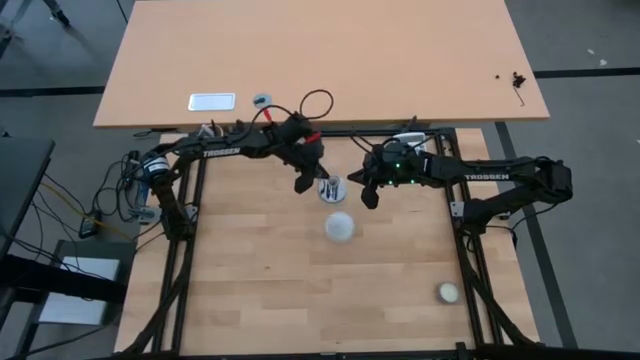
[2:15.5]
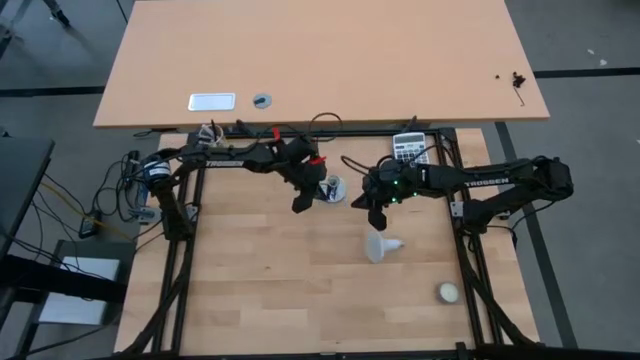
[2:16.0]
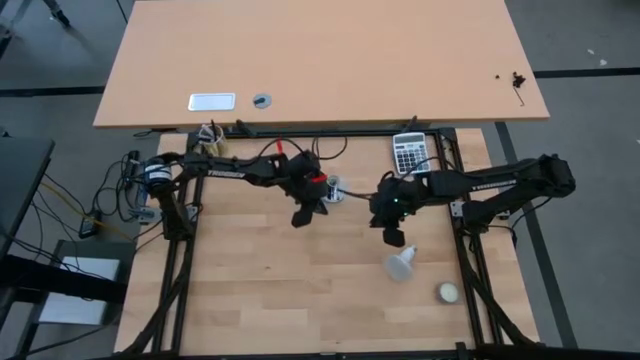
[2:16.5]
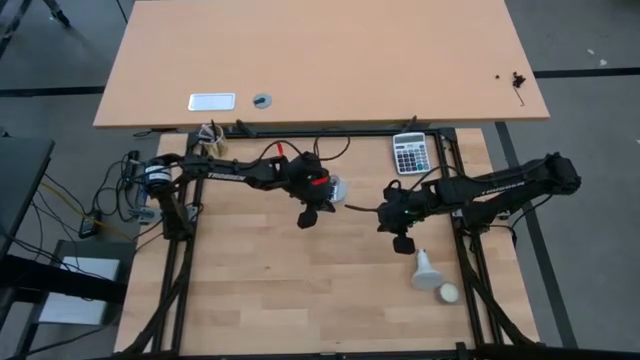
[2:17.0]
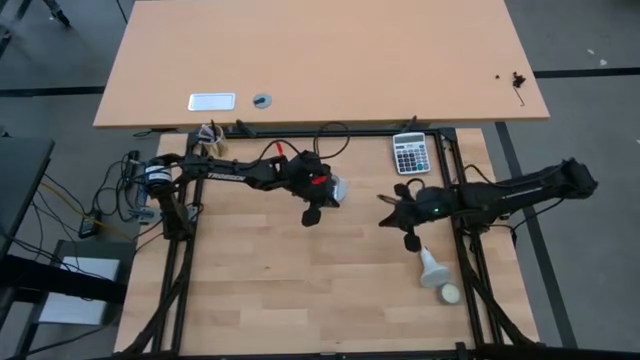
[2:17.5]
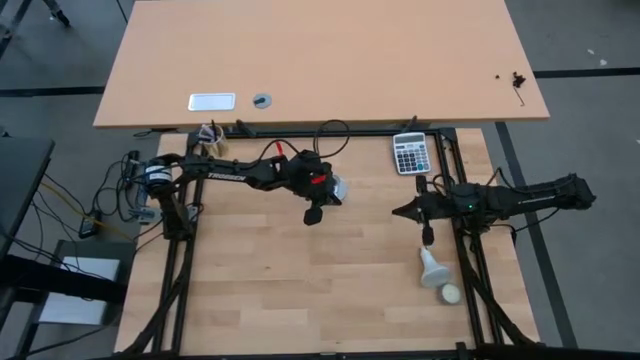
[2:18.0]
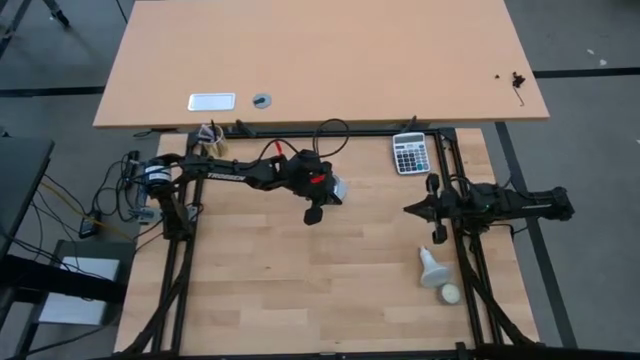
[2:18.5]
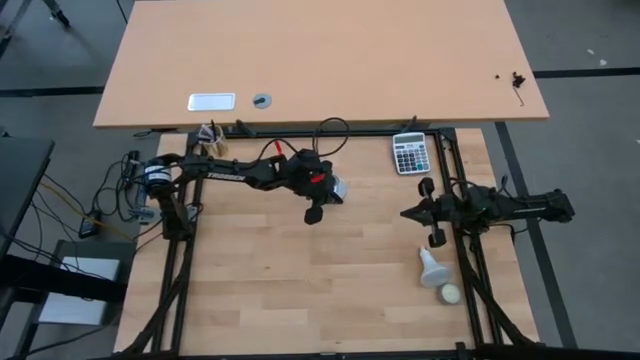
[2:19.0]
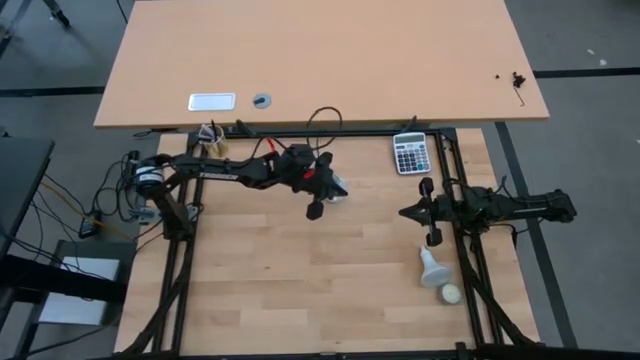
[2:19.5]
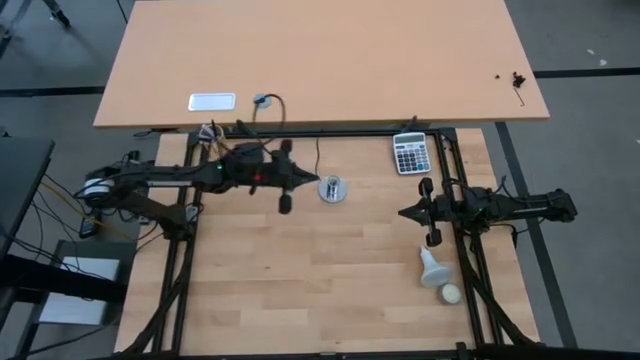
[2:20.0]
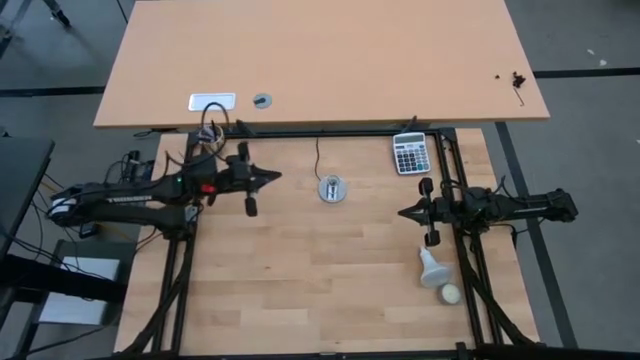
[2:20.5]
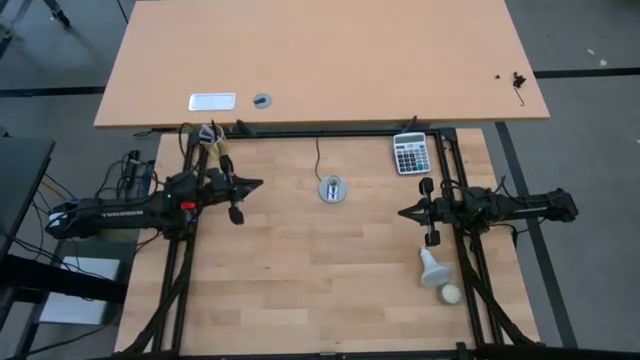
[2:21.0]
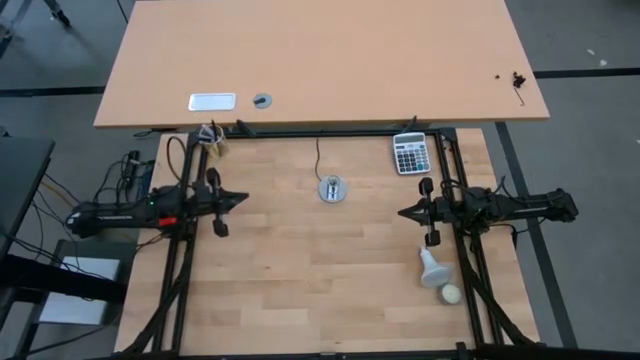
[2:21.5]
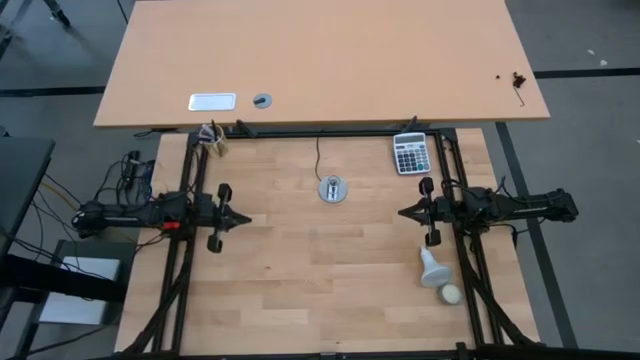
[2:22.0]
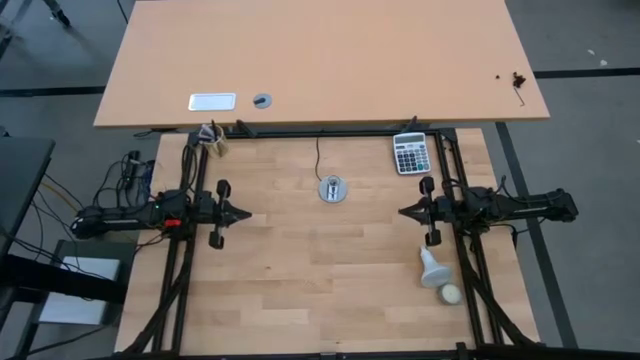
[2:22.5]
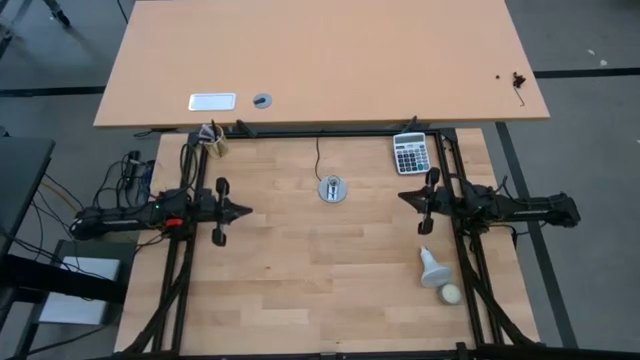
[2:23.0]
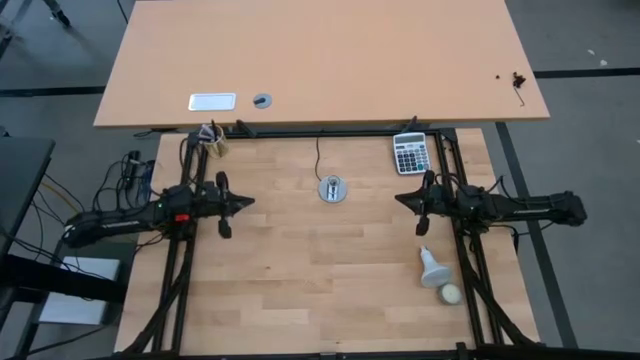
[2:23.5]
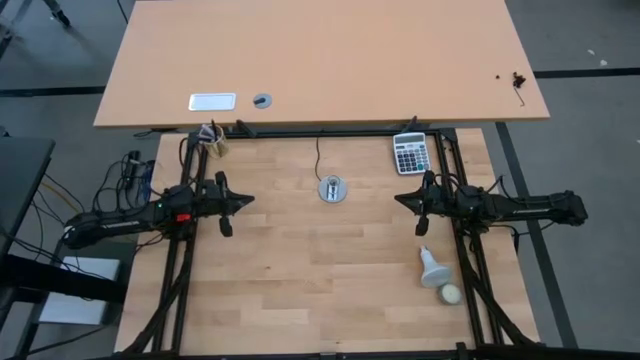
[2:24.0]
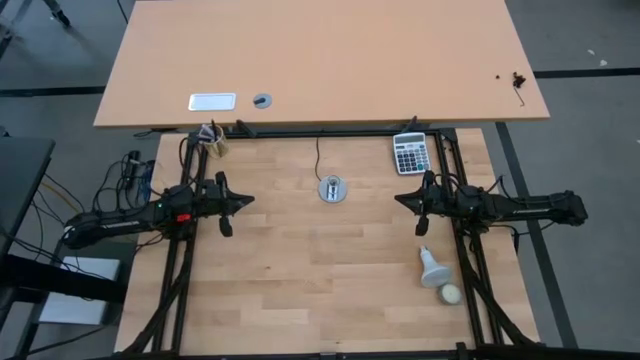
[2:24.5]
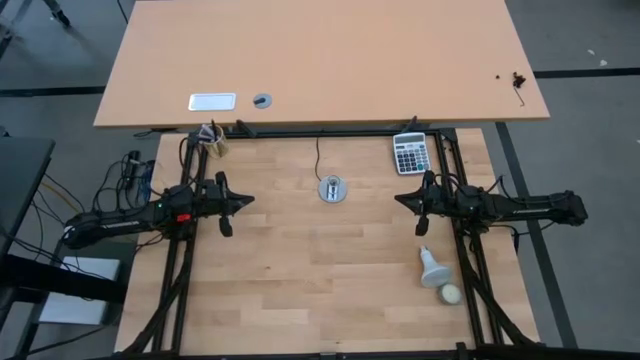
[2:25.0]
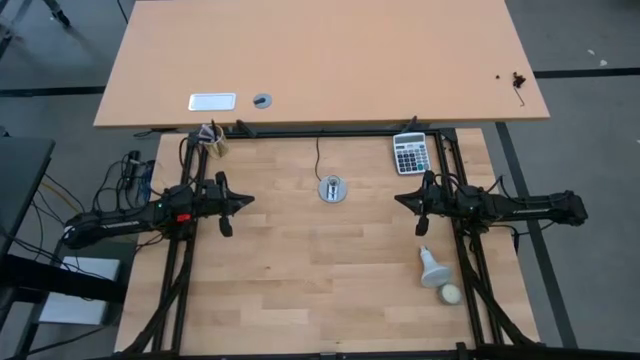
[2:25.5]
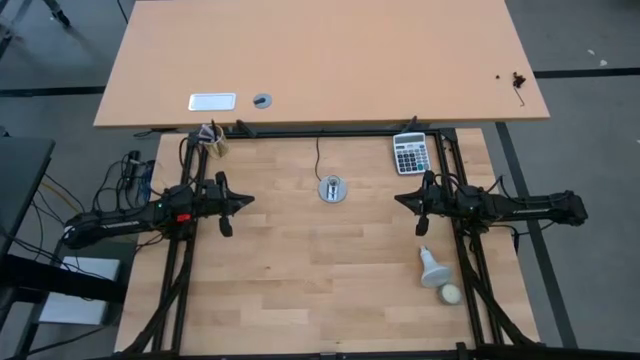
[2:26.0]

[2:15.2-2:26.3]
Task: Screw lightbulb
Return to Home Position

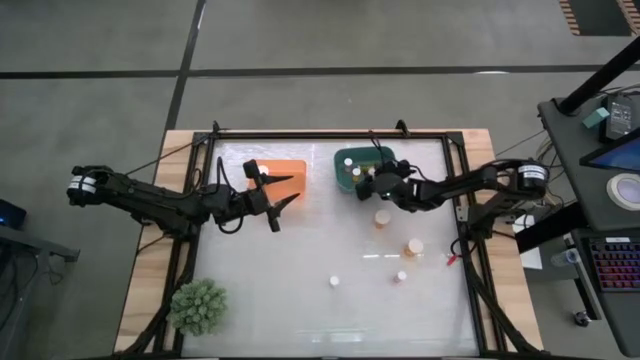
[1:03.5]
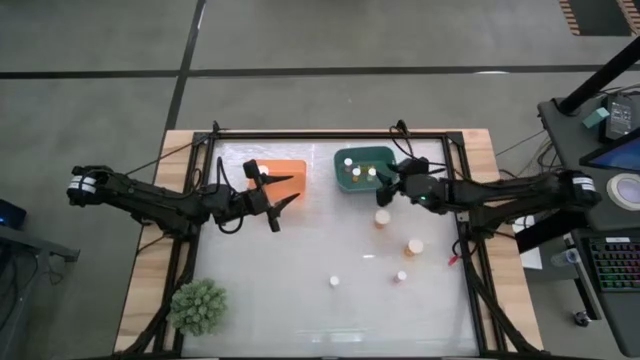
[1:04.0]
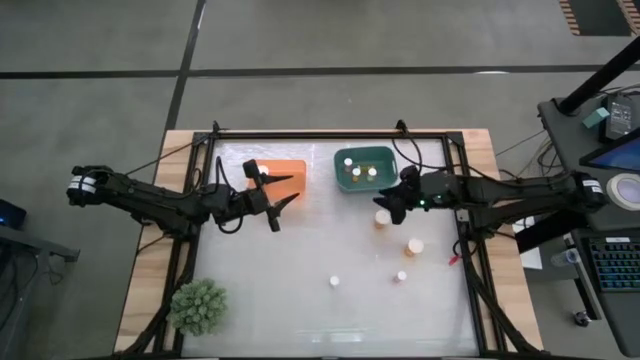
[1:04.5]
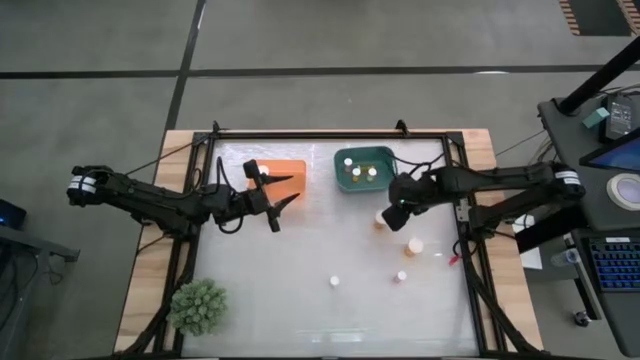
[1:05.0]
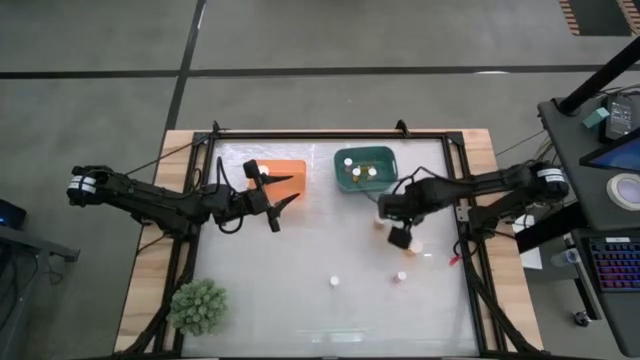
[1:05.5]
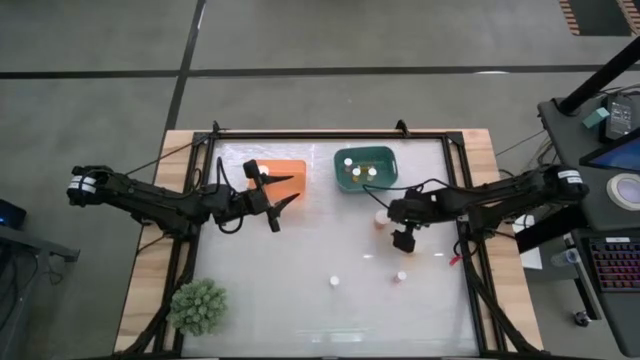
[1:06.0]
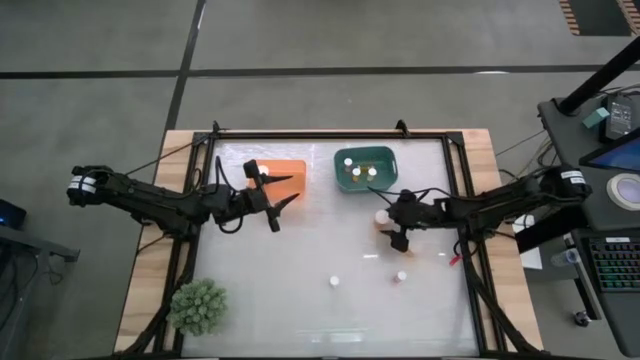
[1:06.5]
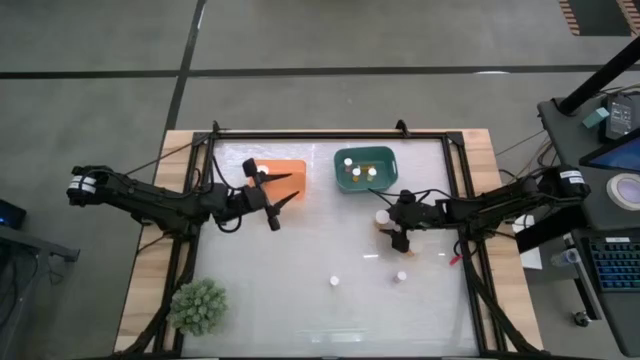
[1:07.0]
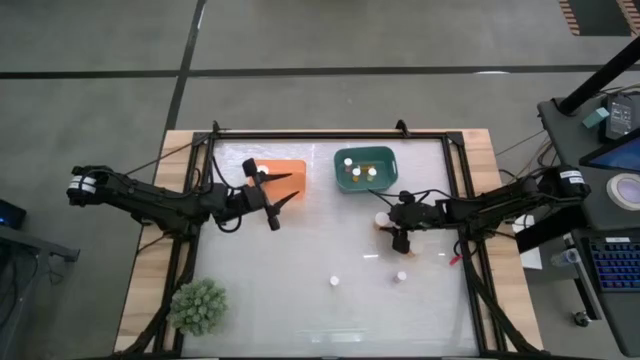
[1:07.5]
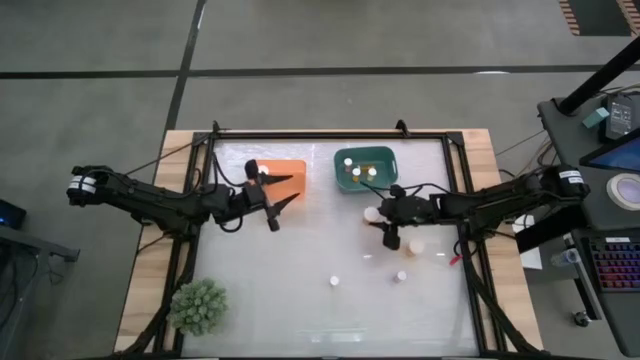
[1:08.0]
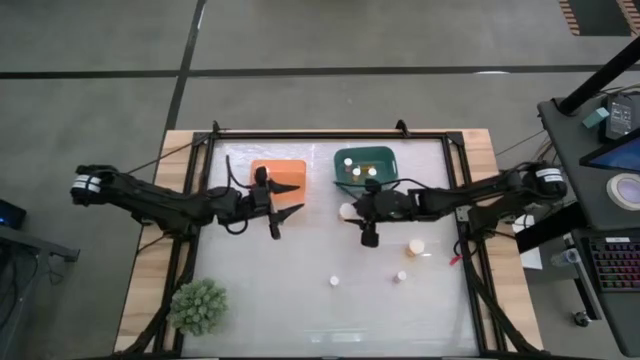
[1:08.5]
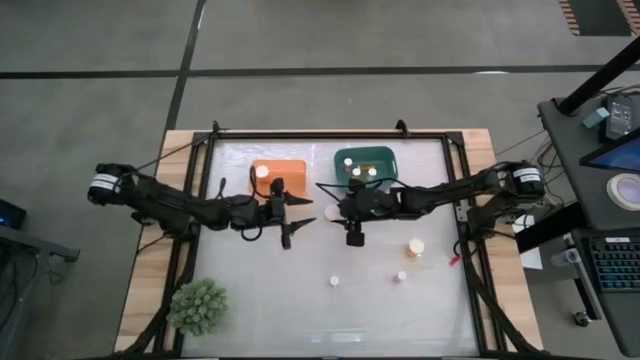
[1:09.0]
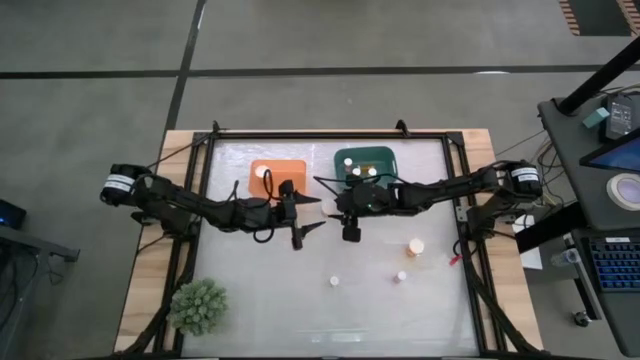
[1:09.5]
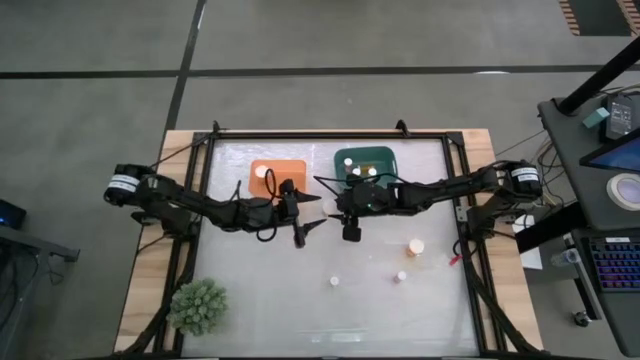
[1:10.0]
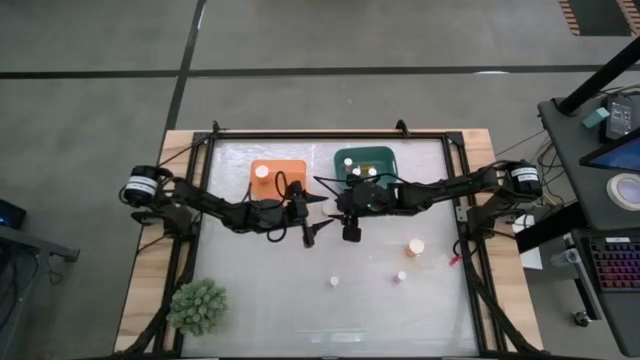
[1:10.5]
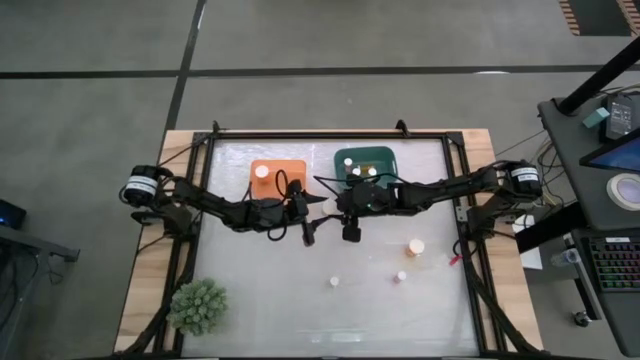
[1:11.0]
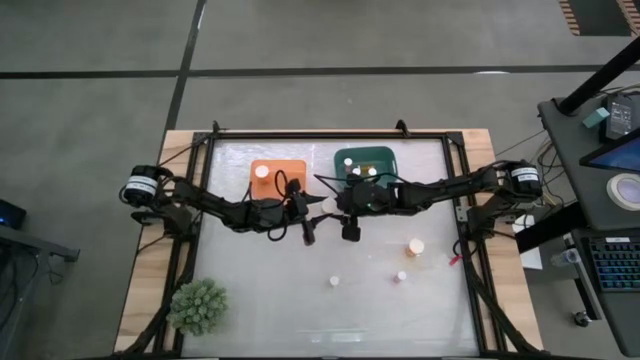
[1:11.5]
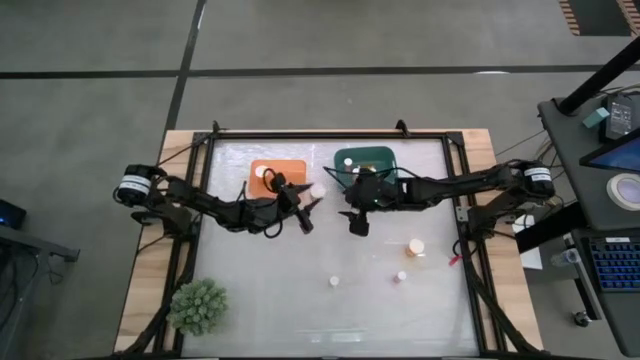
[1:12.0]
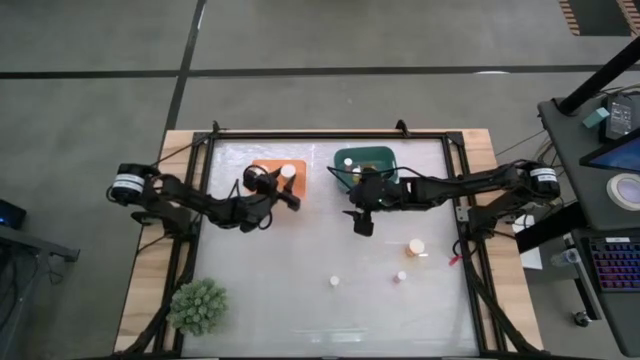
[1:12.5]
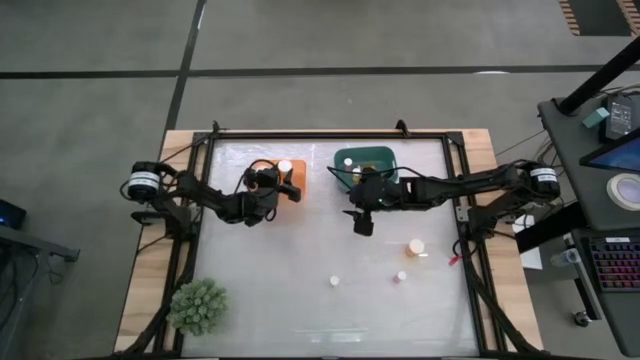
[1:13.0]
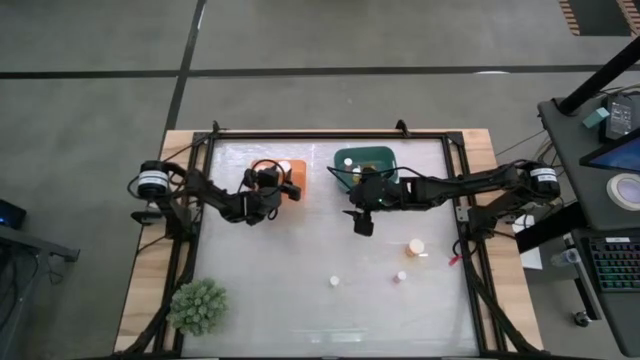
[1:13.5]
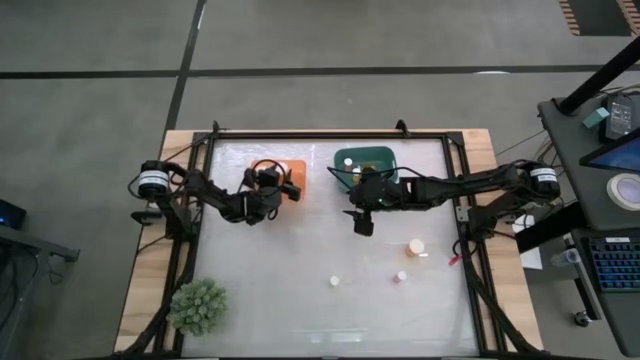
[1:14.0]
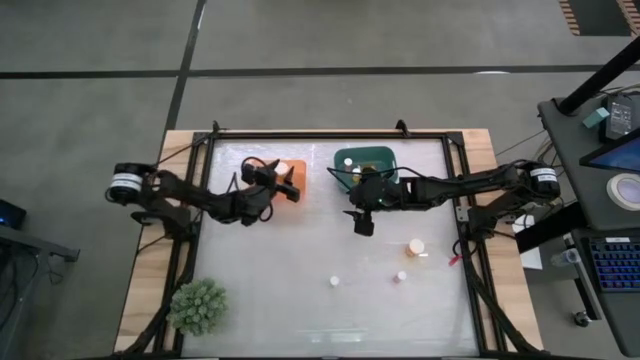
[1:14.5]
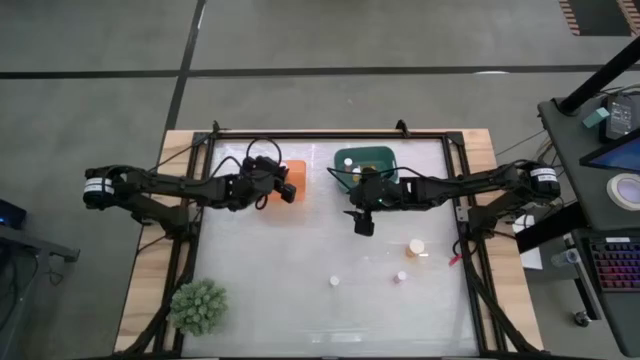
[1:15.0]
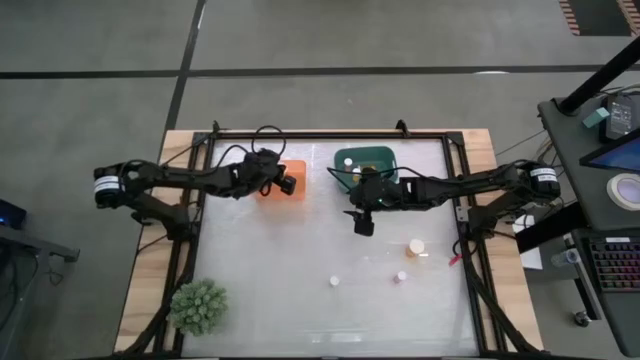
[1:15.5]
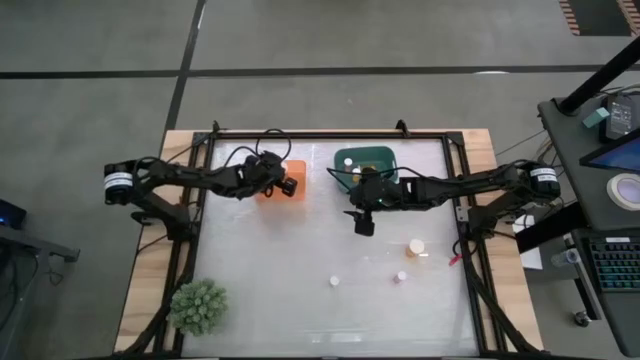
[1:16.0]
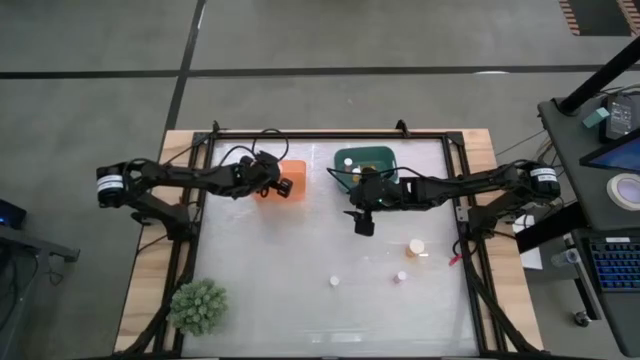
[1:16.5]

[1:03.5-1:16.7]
Task: Pick and place medicine bottles into bin by pill shape (circle, oval)
Put the top large orange pill bottle into the orange bin
